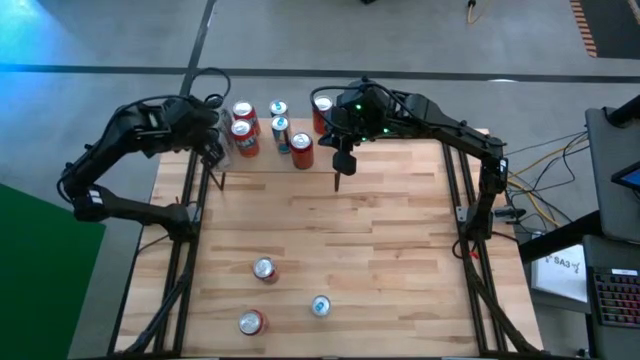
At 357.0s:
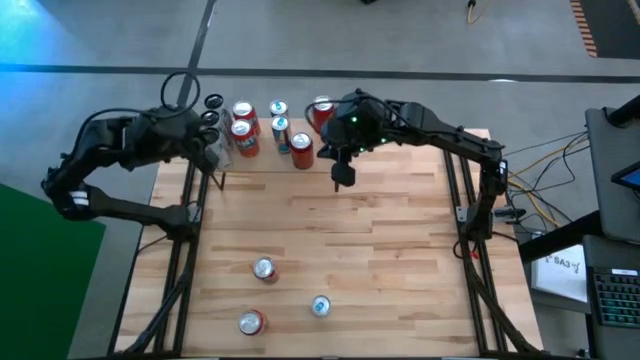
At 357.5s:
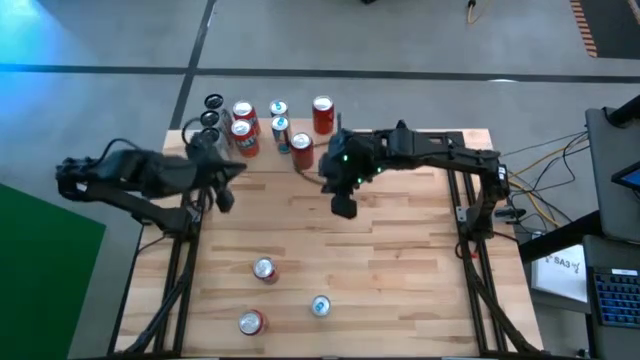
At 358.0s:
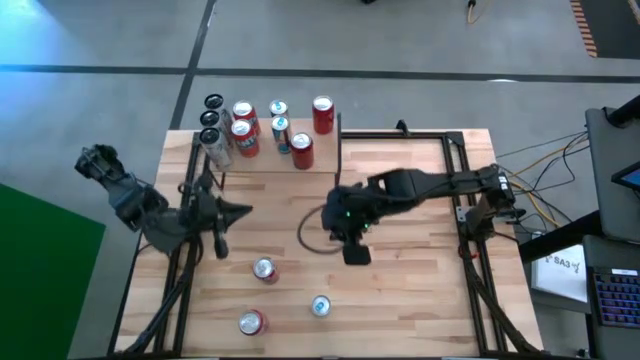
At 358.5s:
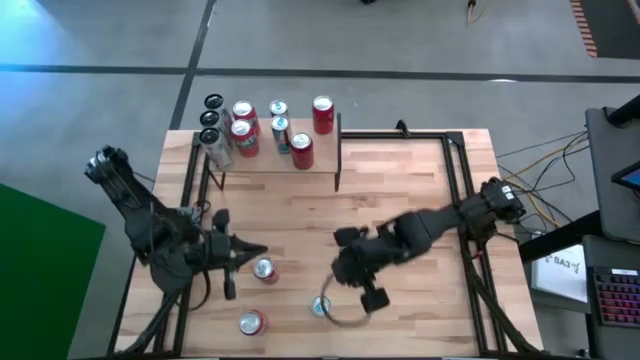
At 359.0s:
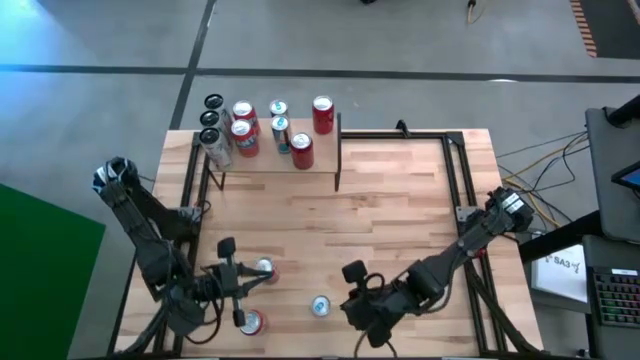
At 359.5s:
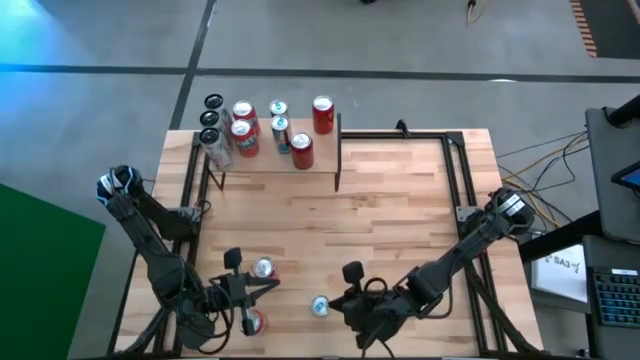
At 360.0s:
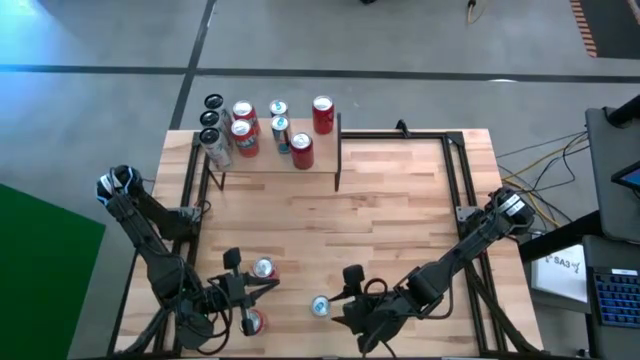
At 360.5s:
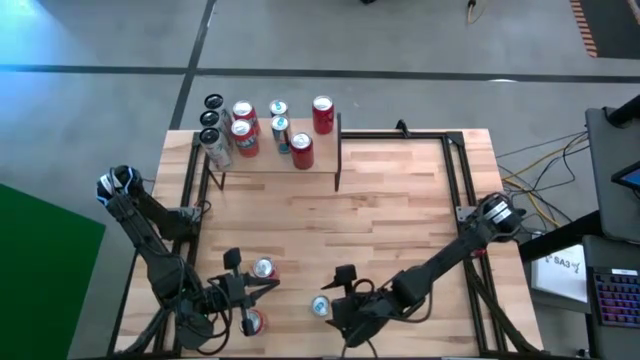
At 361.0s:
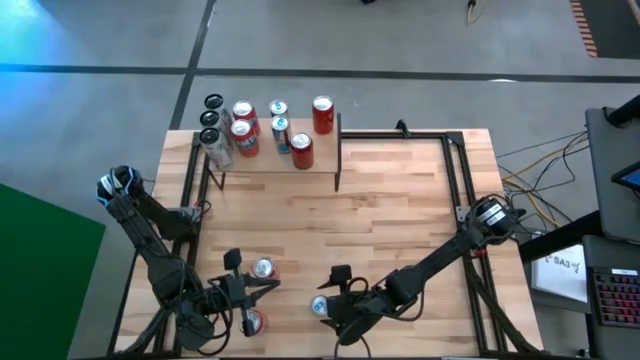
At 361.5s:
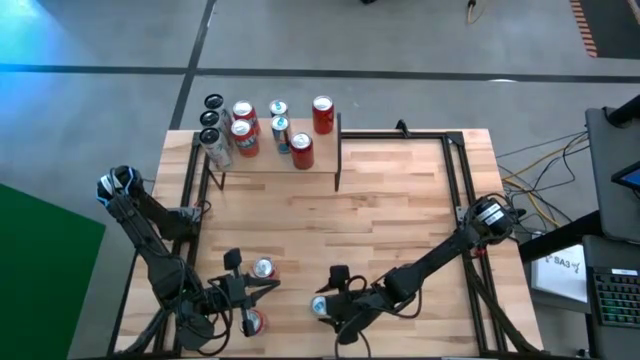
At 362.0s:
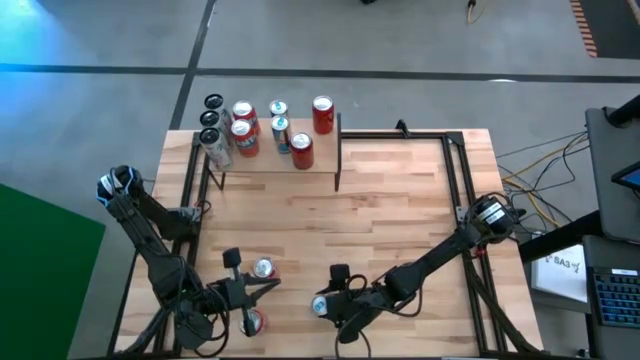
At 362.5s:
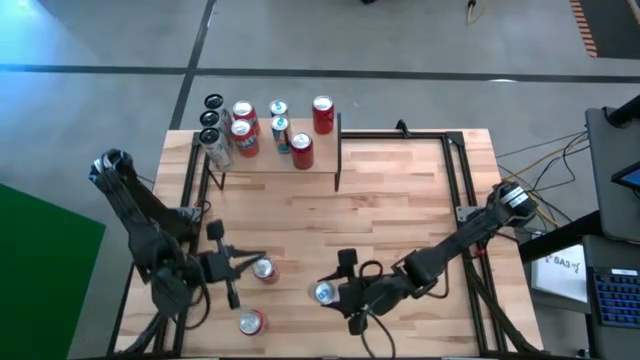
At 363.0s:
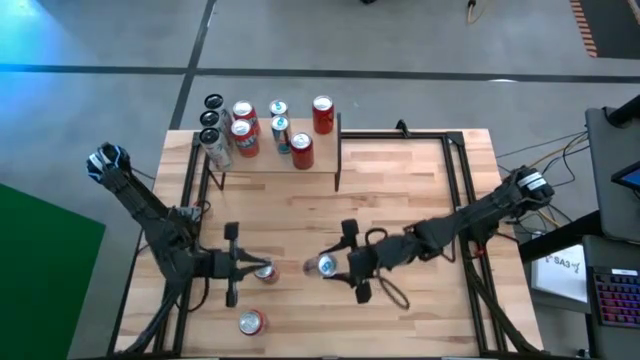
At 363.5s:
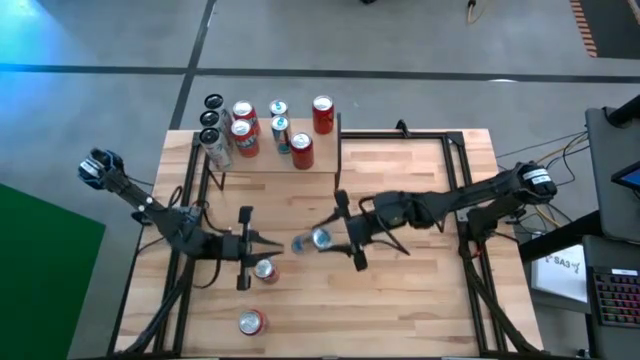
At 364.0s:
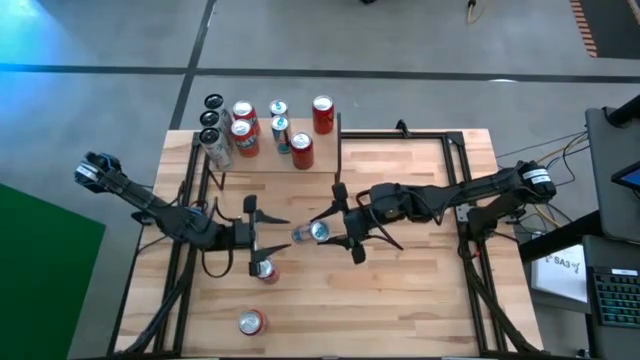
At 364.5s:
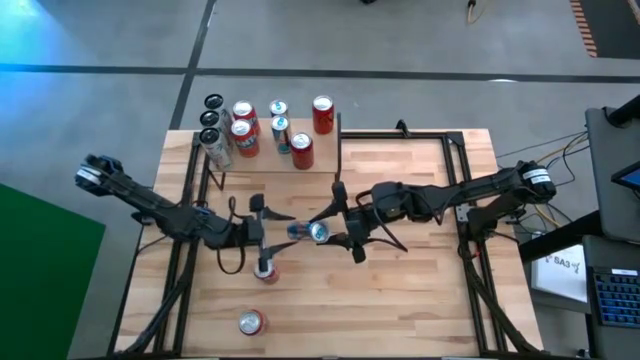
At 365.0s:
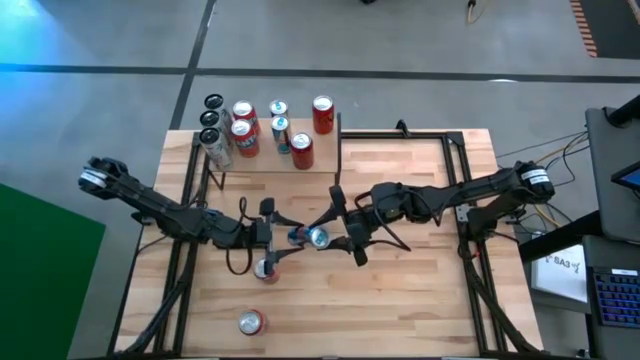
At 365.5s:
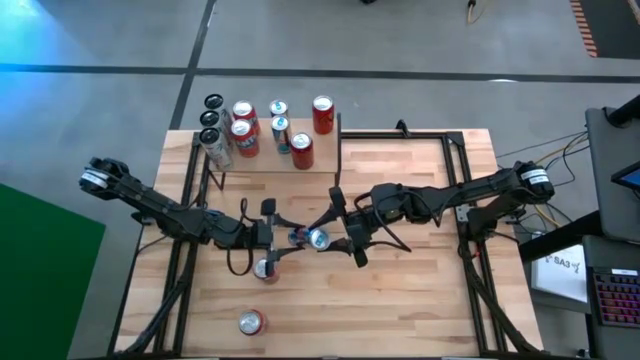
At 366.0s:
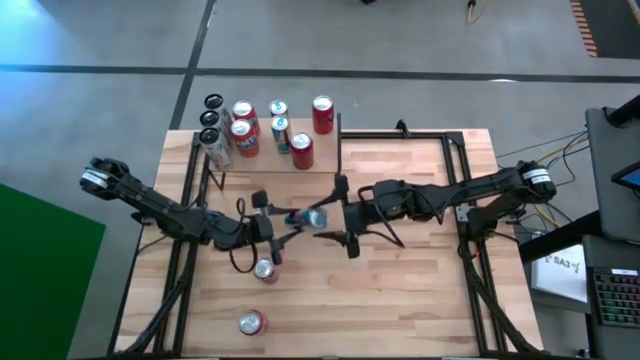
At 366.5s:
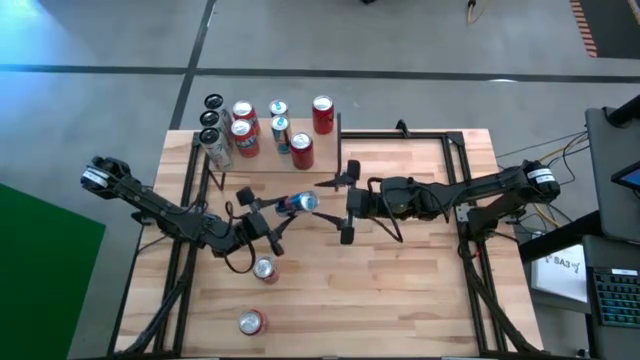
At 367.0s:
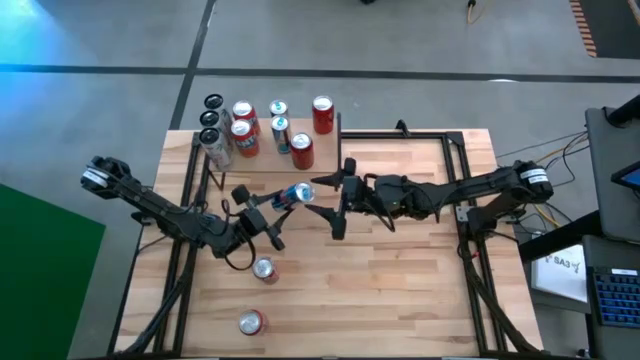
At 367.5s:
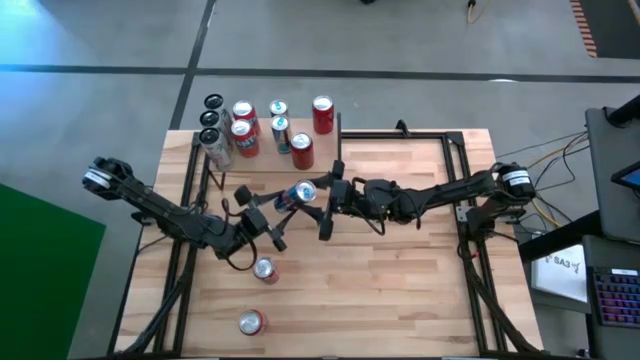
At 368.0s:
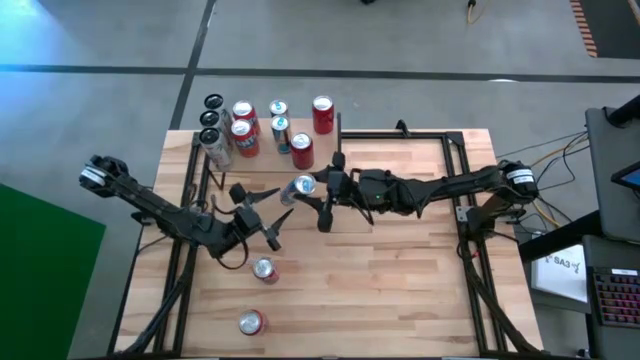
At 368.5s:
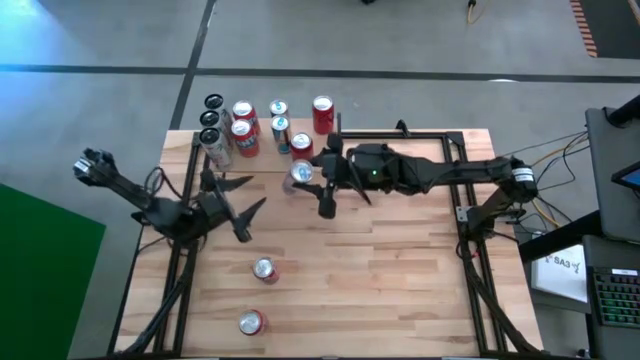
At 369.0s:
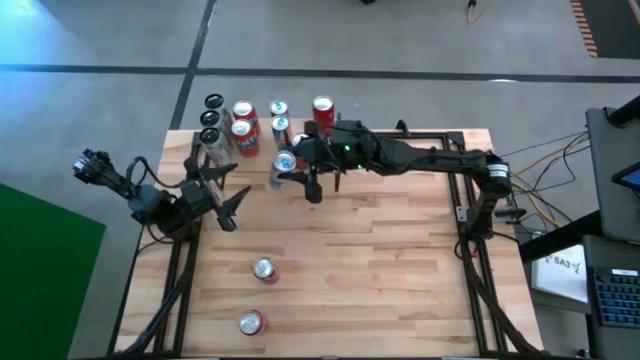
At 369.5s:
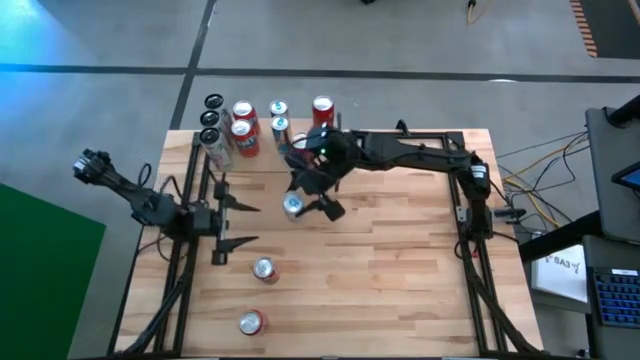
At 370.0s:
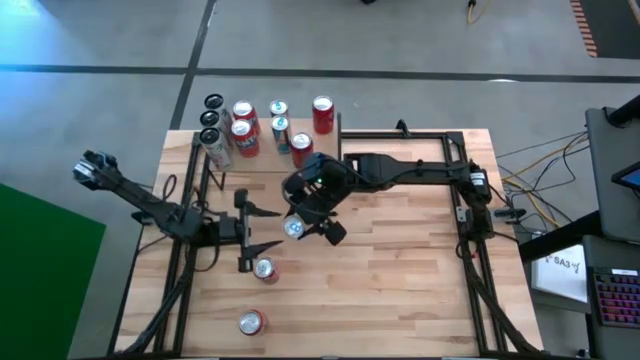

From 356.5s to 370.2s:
Task: Place canned beverage on shelf
Put the blue soda can on the shelf aligned with the other blue soda cans

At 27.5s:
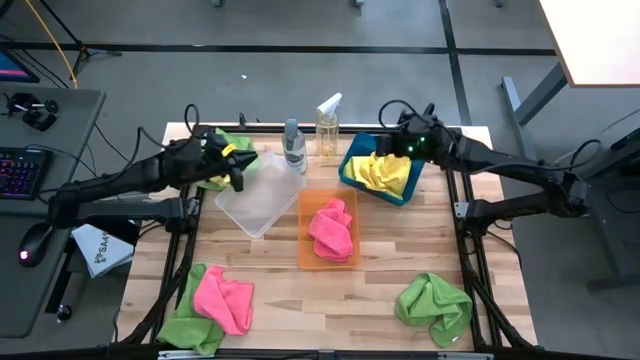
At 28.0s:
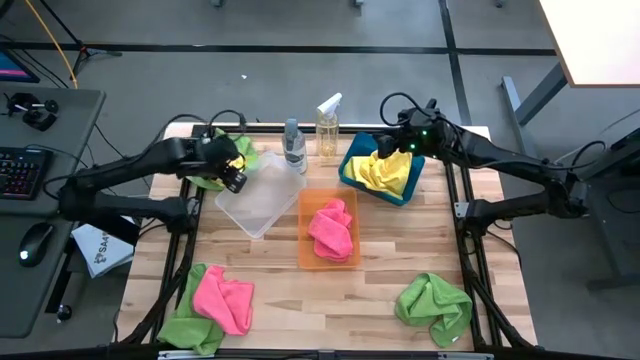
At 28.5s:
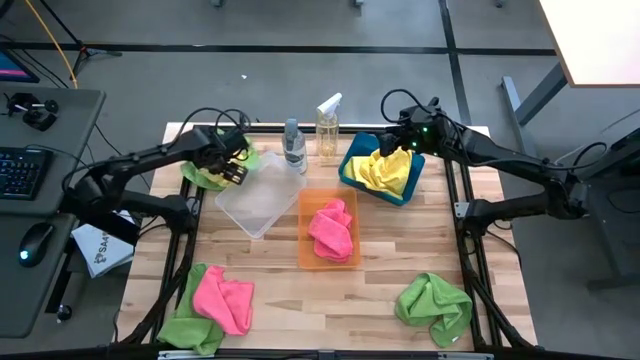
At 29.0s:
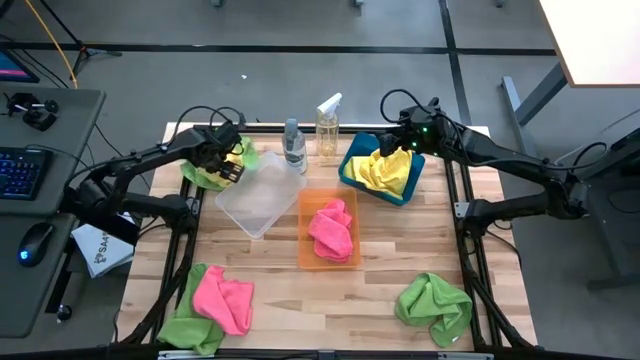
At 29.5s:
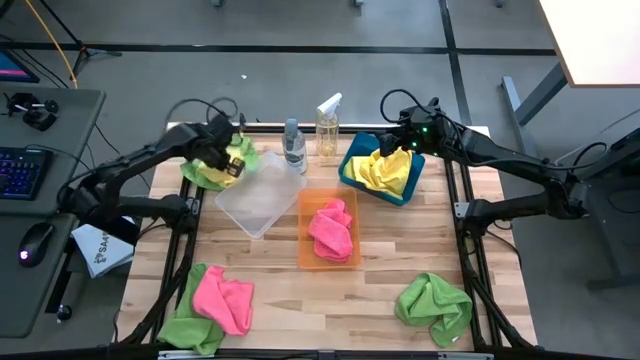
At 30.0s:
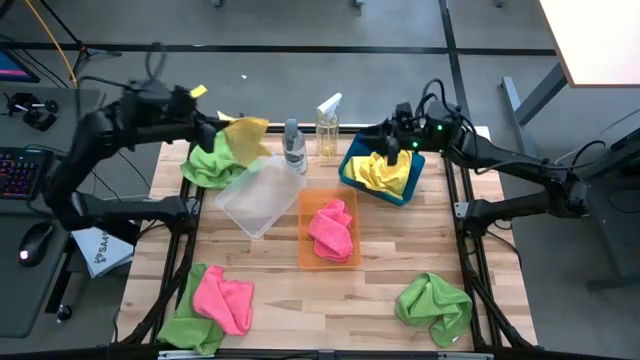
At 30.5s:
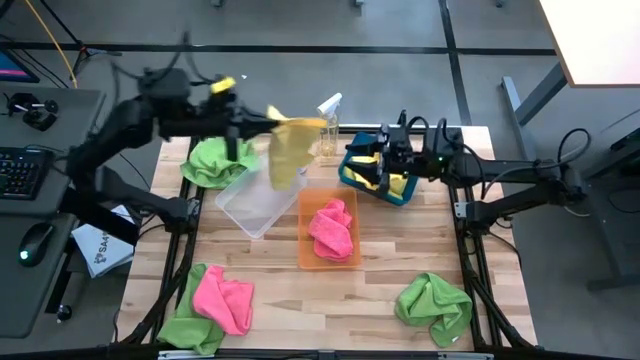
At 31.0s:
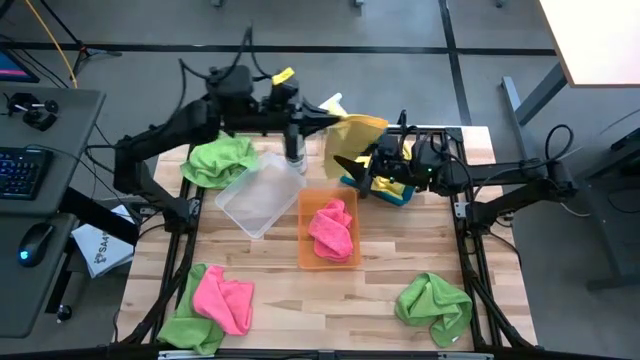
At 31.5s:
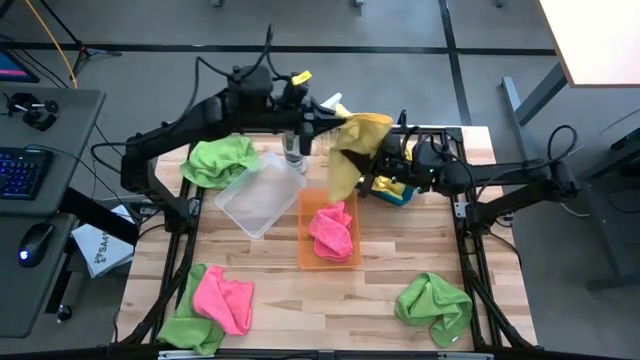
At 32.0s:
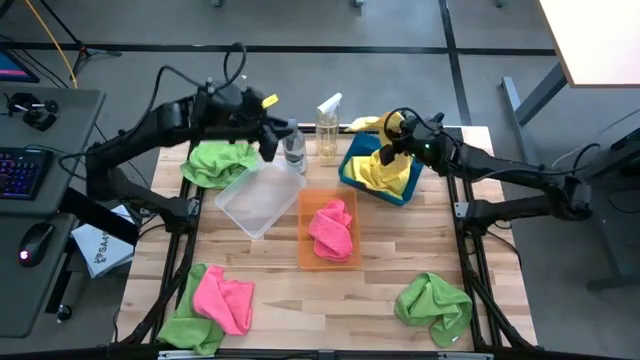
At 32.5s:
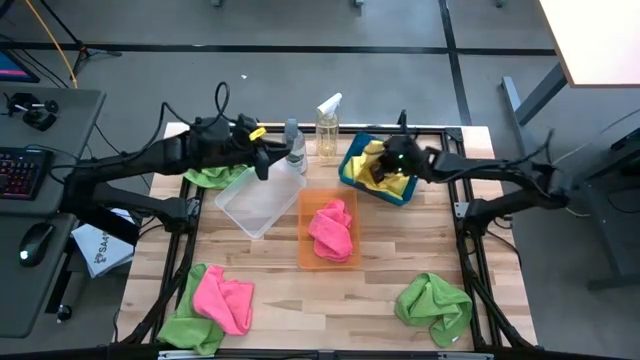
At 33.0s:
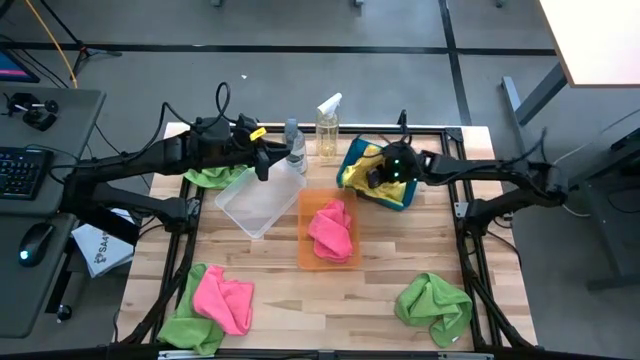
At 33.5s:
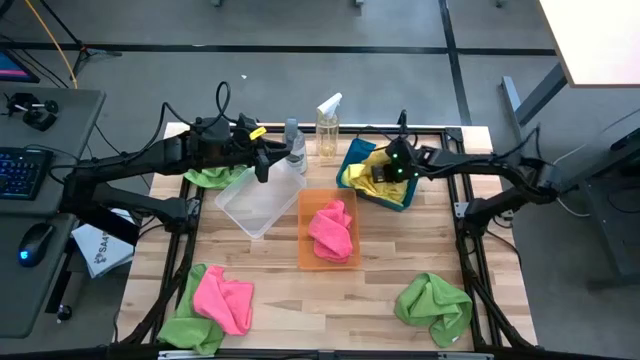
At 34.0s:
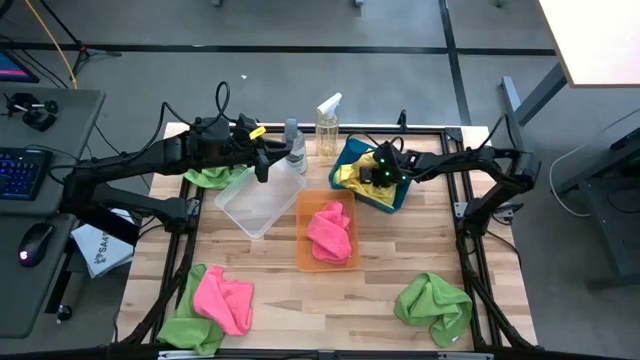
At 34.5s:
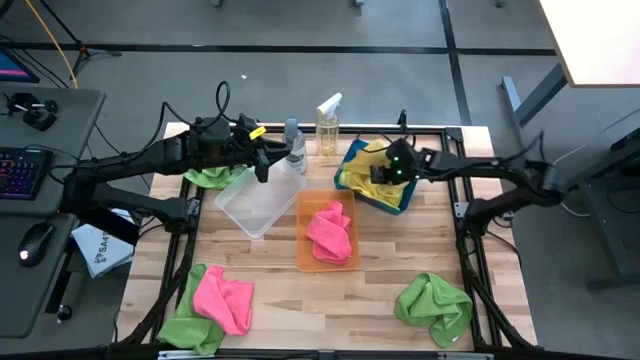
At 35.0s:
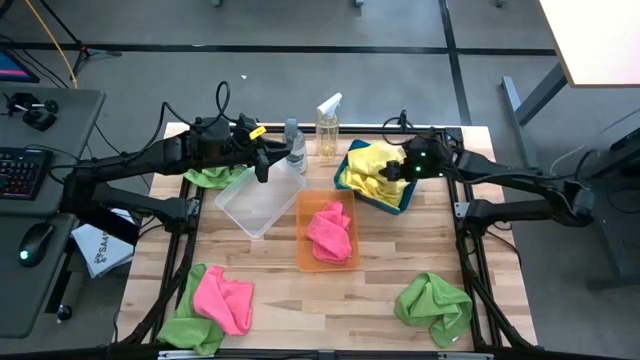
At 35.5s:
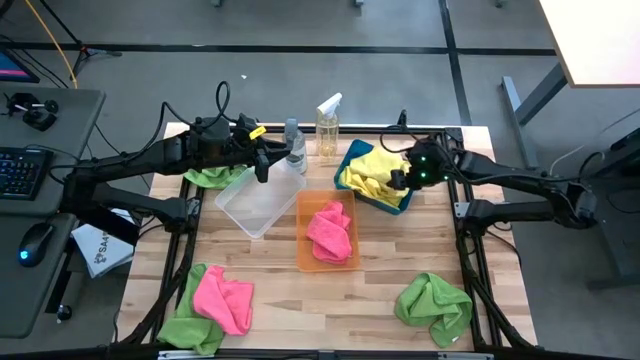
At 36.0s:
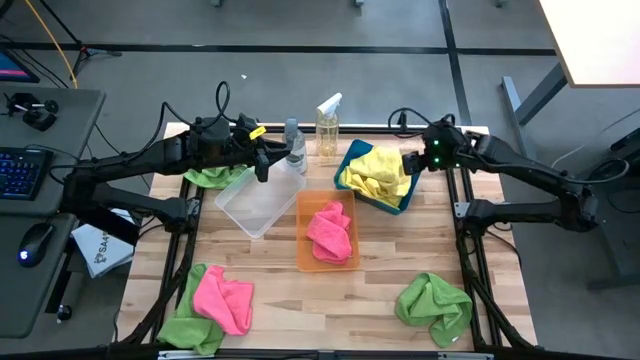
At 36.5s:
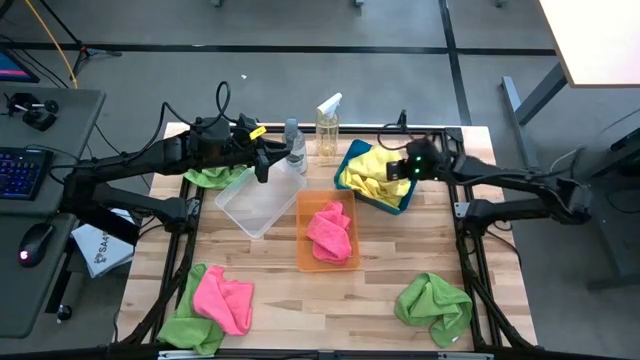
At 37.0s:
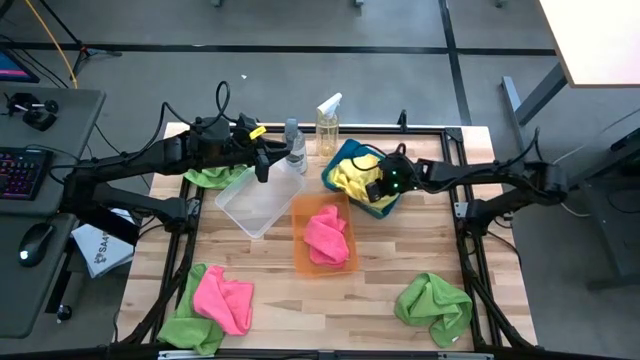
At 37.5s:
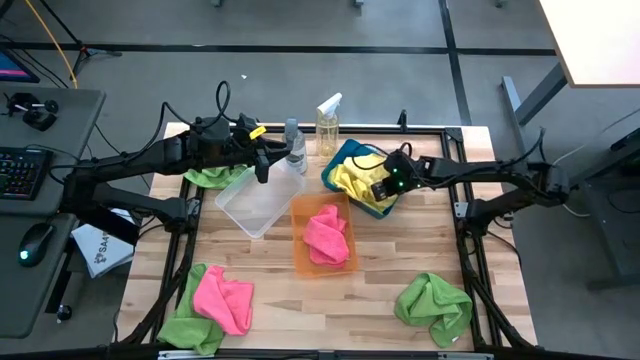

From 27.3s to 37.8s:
Task: Sort microfiber towel by color & place in baskets
Put the yellow towel into the blue bin
